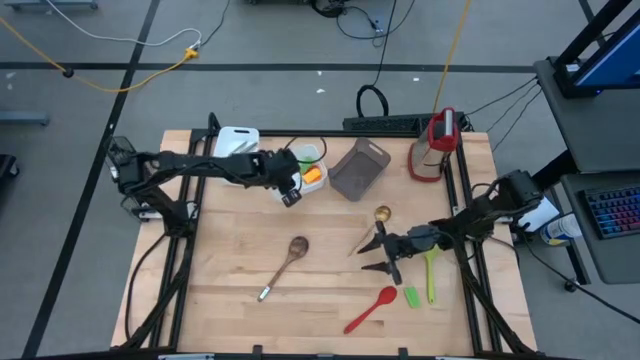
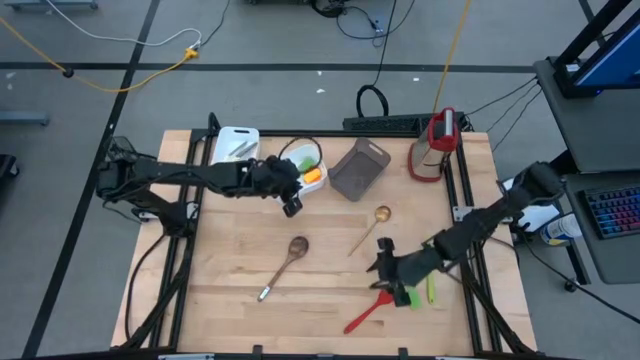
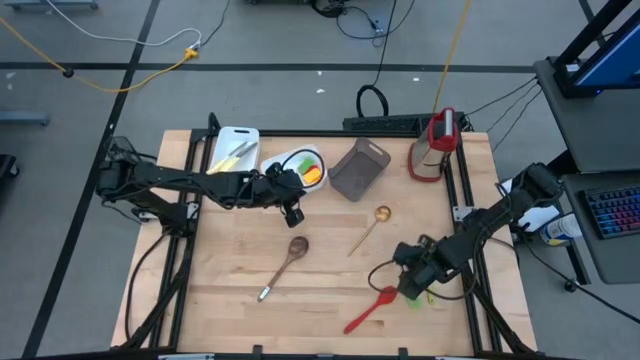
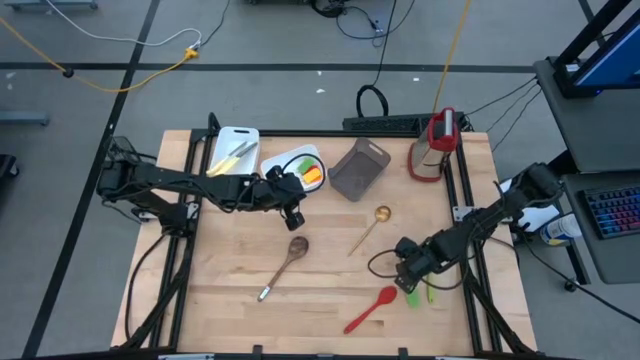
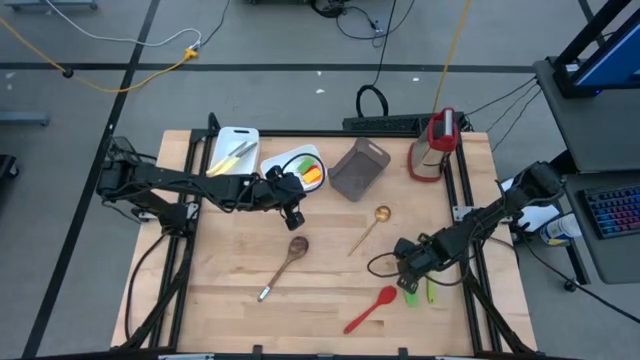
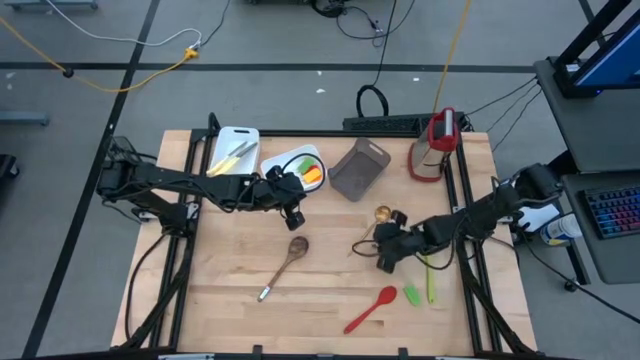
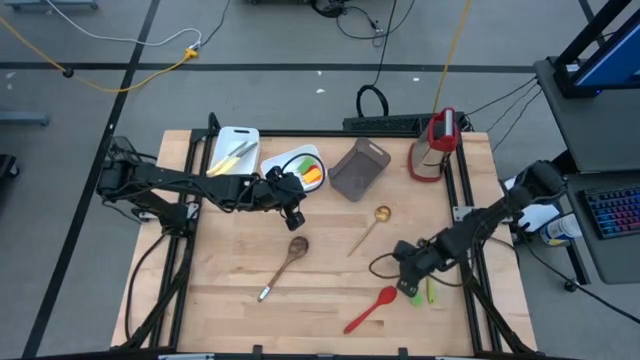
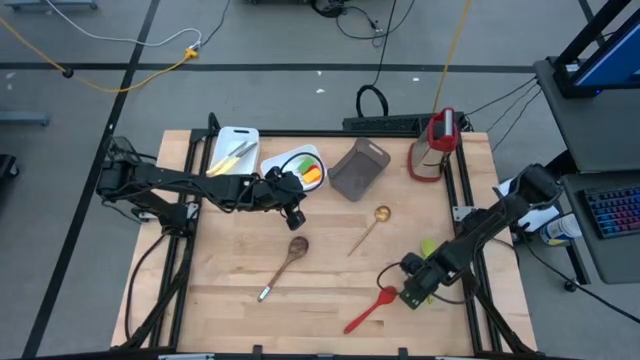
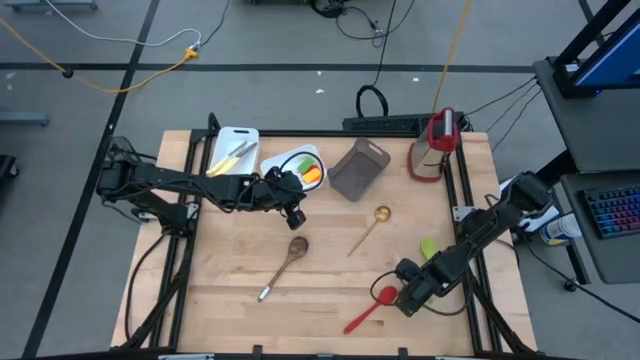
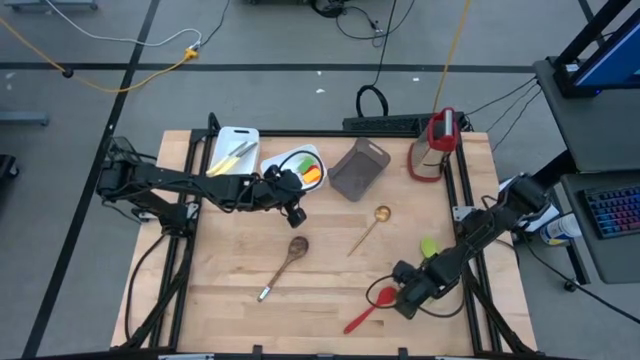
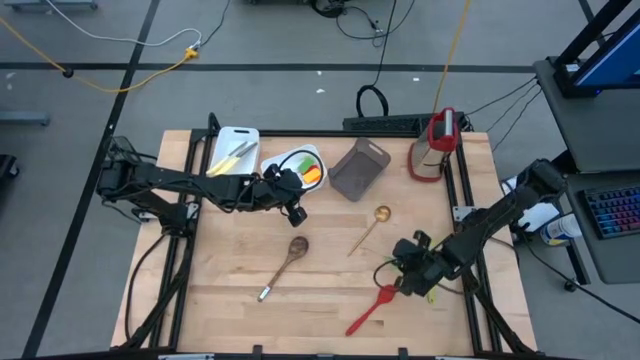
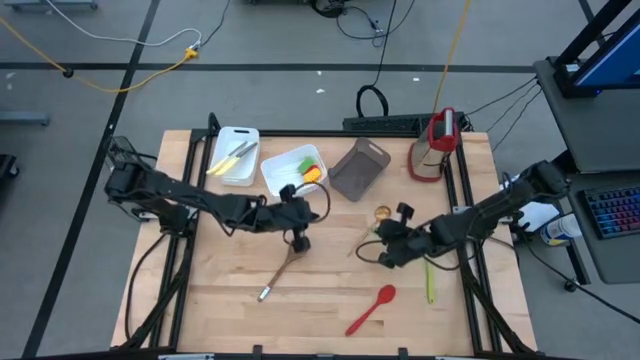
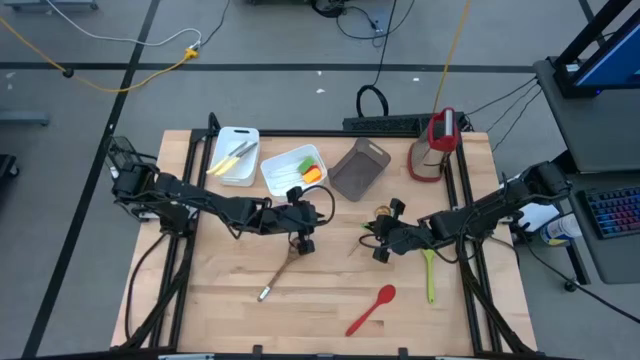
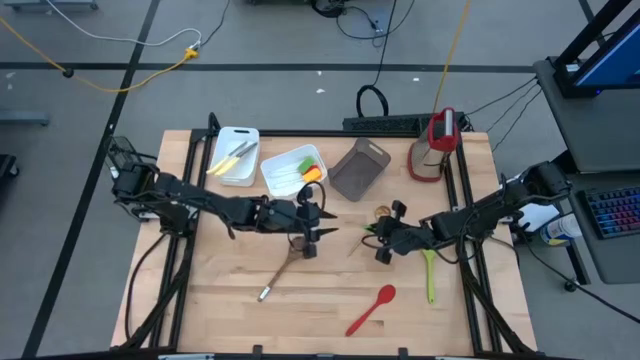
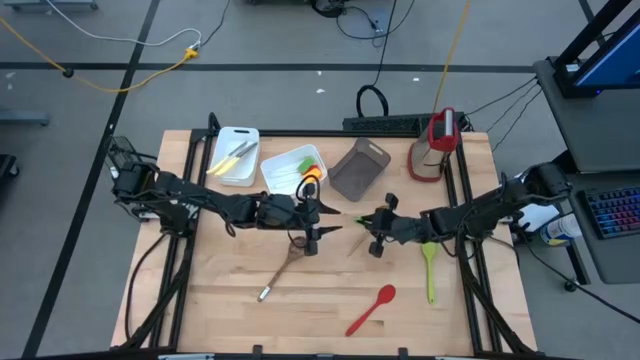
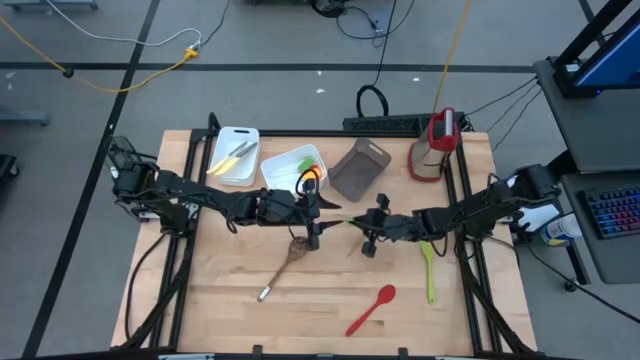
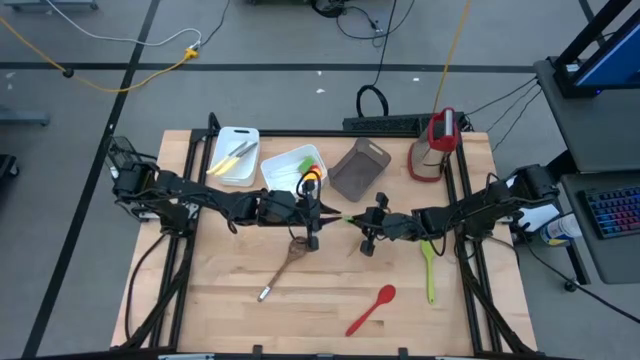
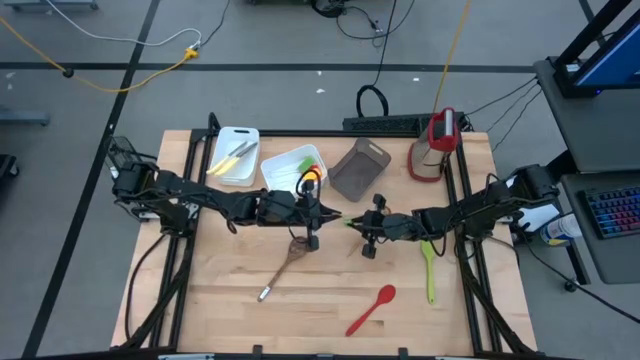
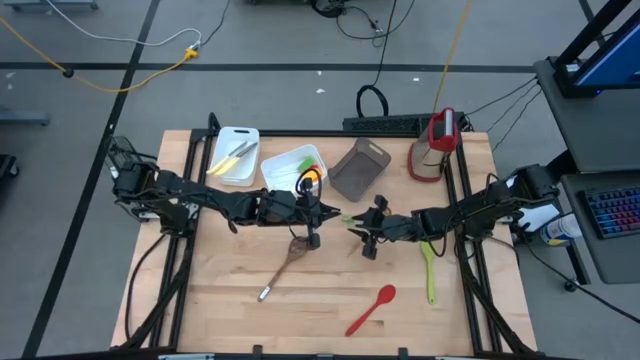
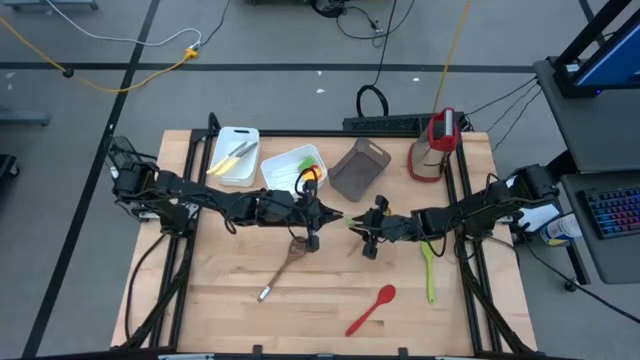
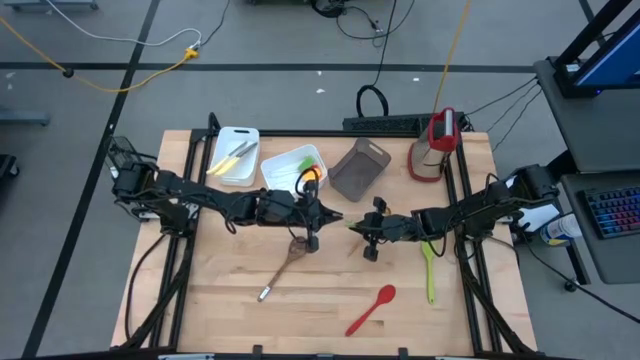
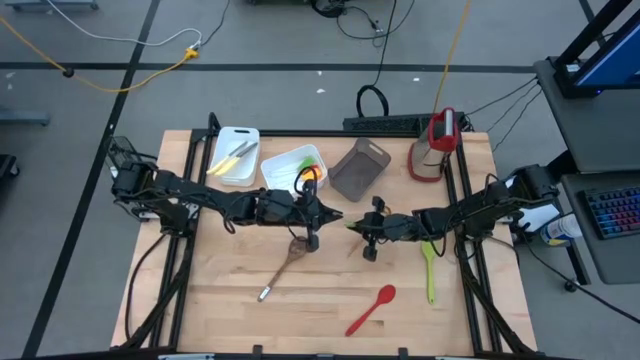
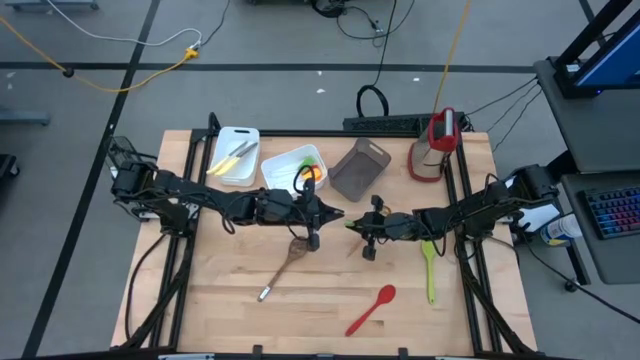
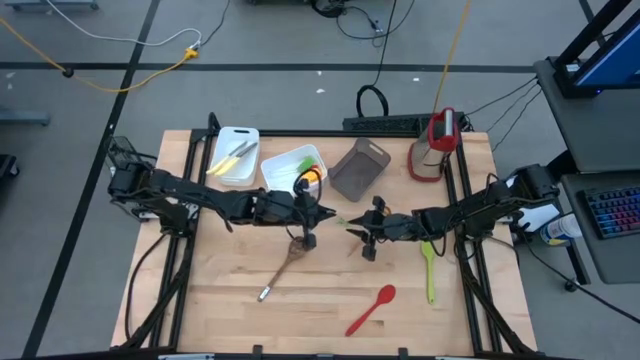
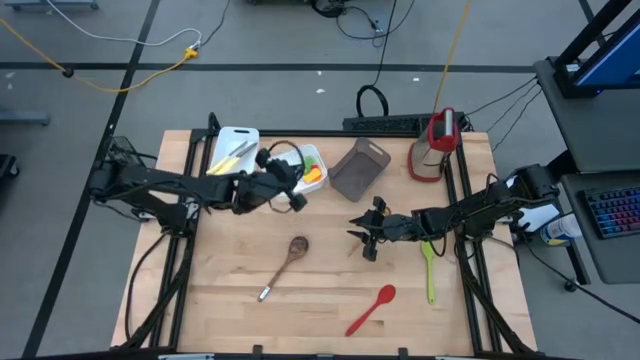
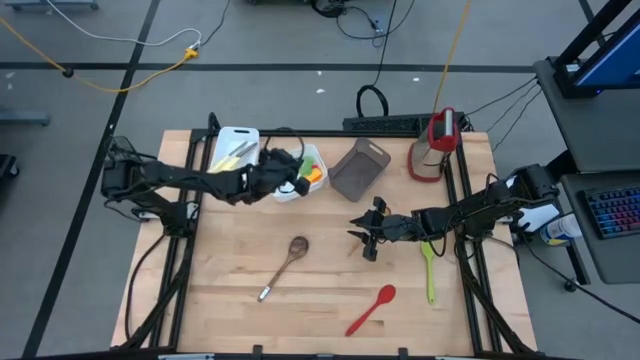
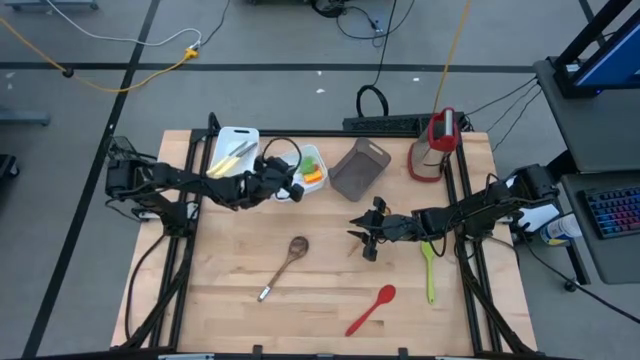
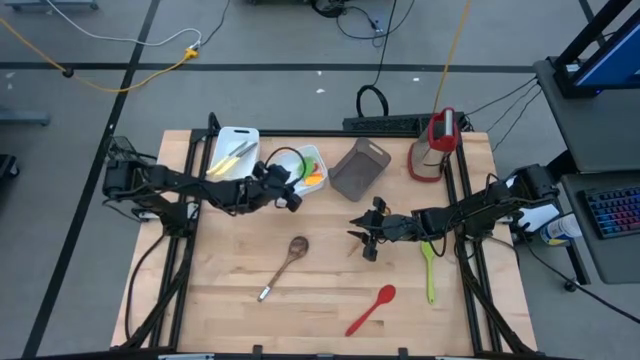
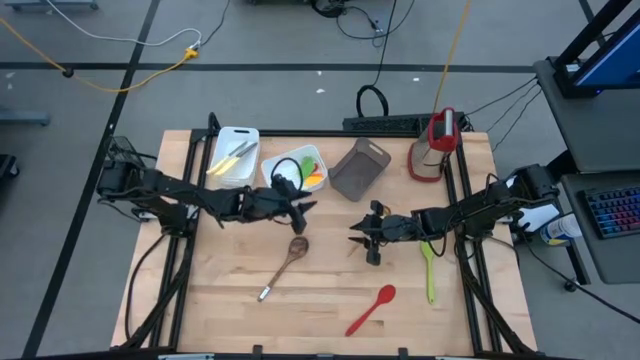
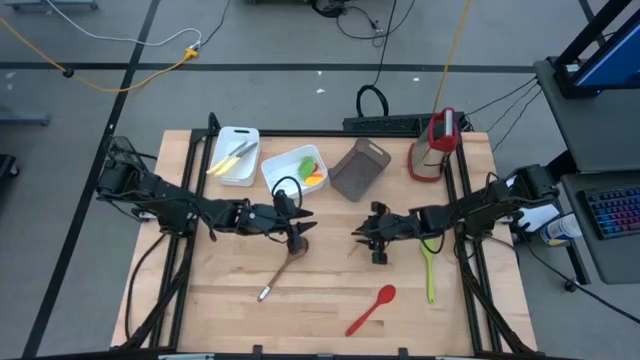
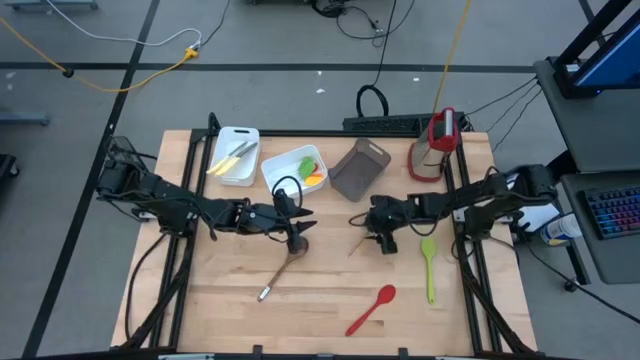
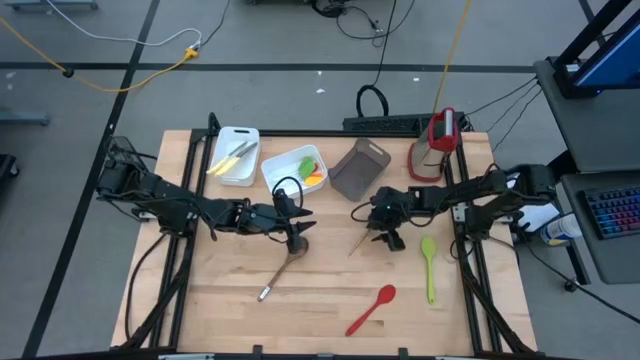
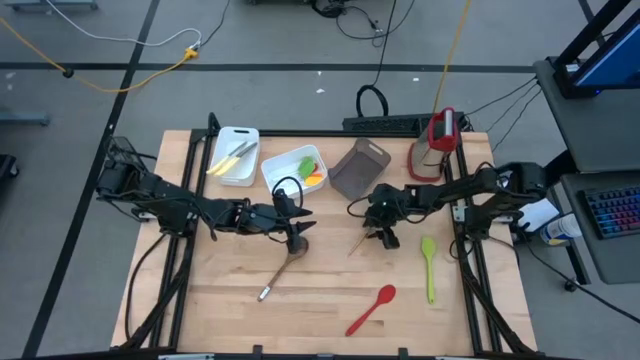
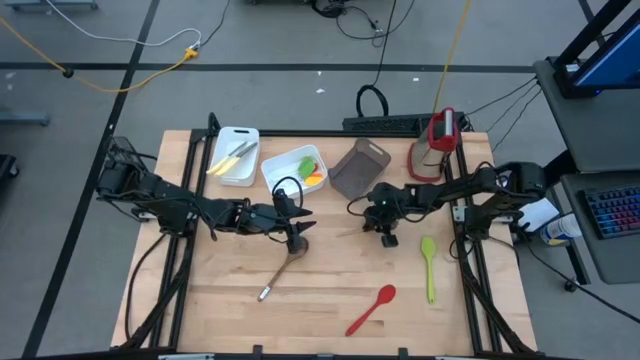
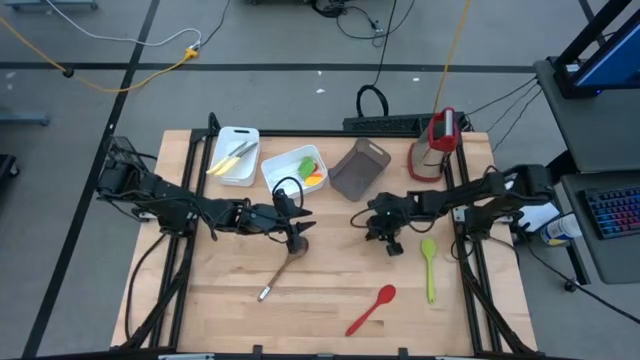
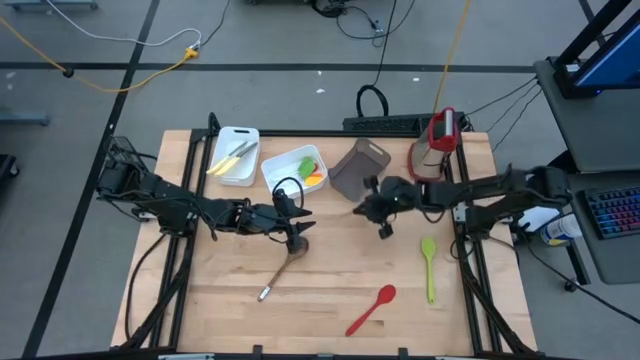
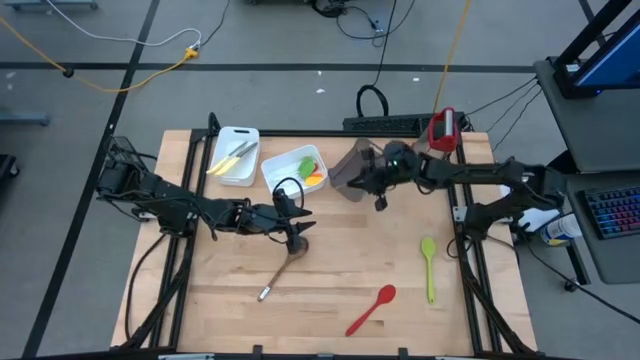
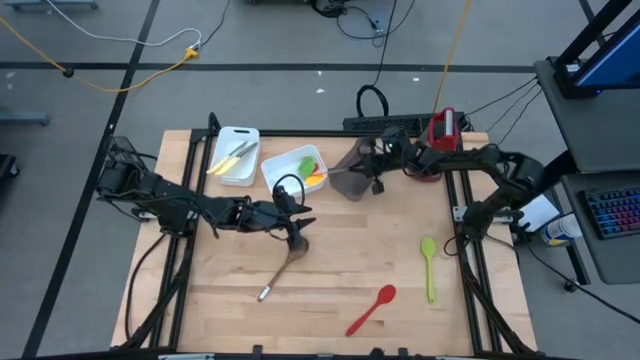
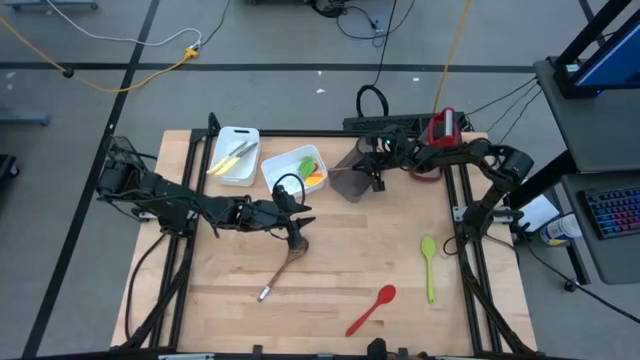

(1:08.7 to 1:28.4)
Task: Pick & Place Kitchen Items
Put the gold spoon into the black bin

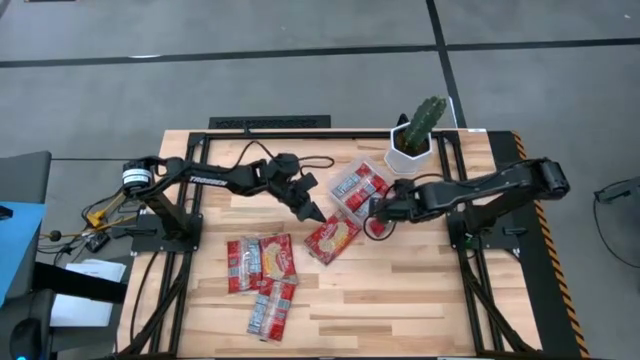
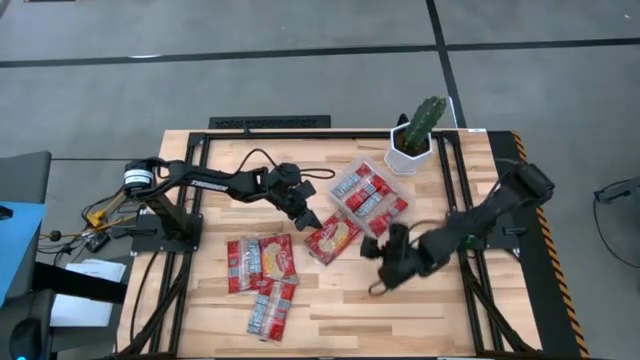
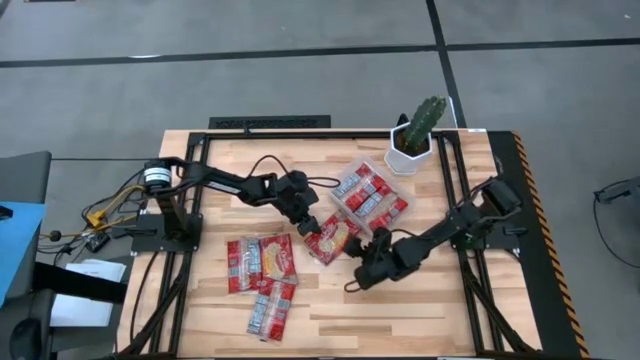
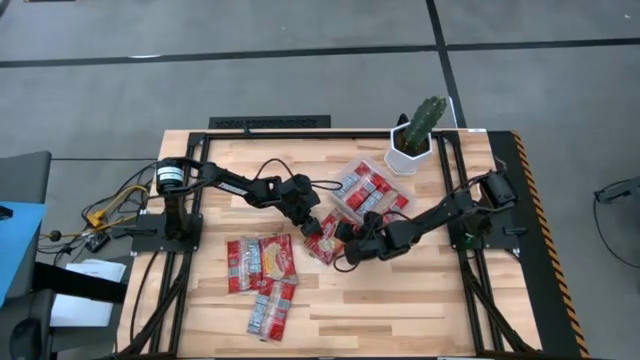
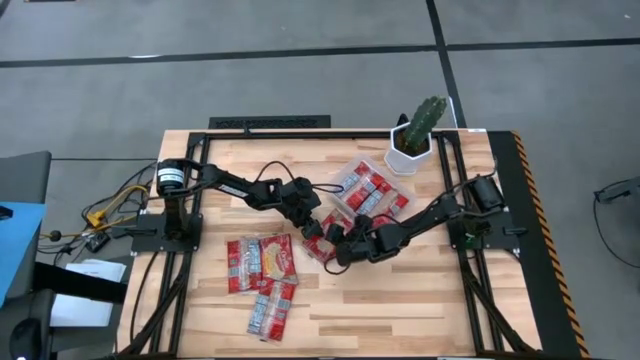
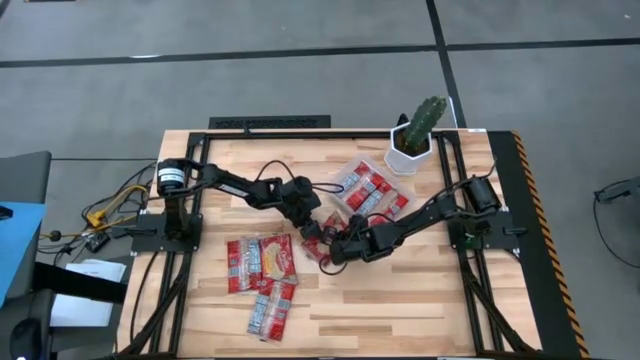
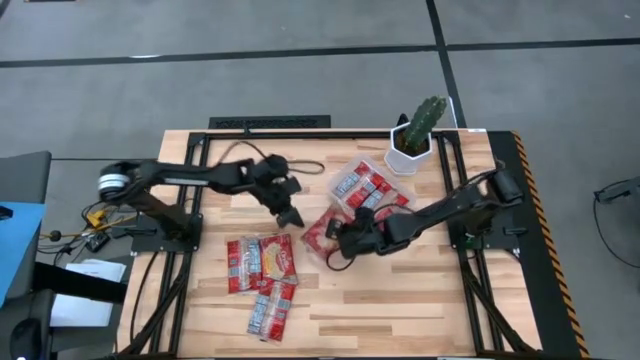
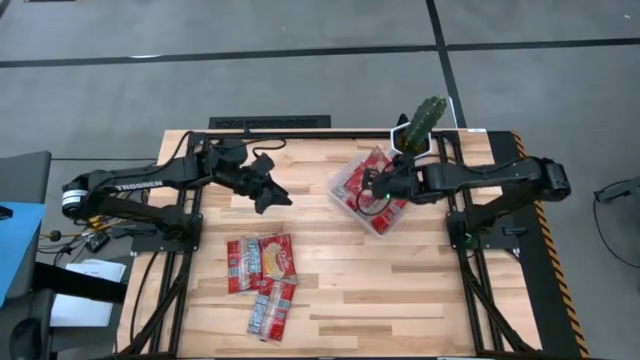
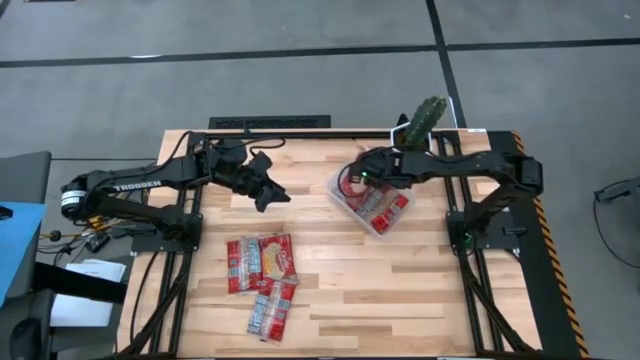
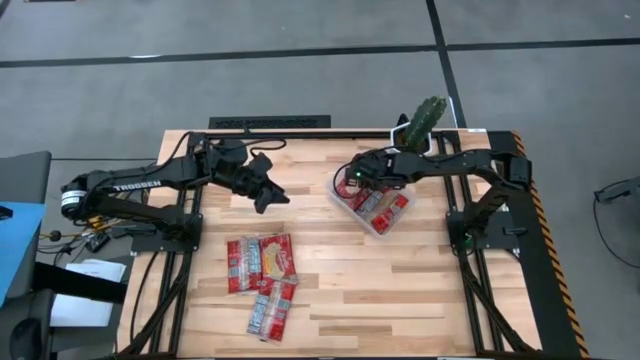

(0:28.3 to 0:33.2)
Task: Sort popcorn bags into baskets
Put the red popcorn pack into the transparent bin
